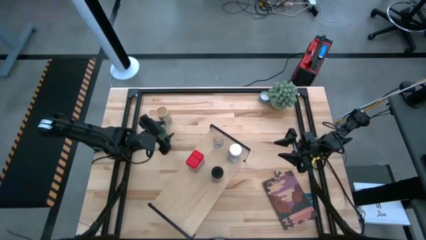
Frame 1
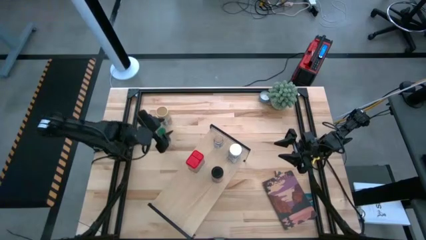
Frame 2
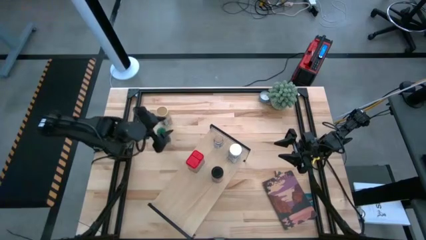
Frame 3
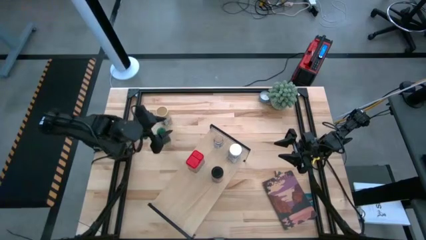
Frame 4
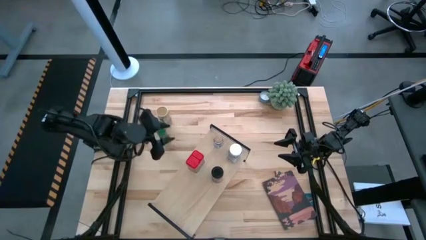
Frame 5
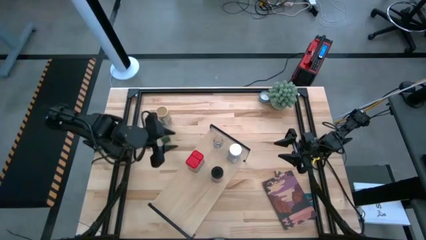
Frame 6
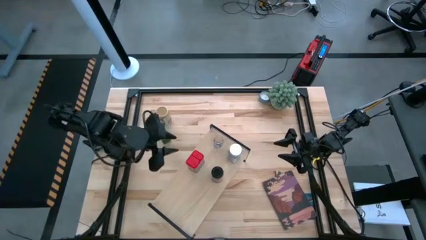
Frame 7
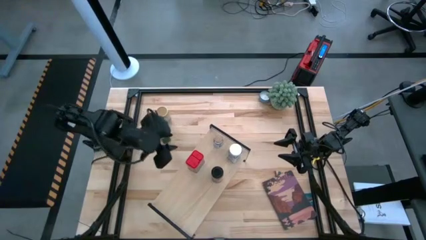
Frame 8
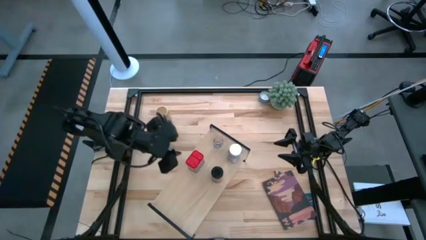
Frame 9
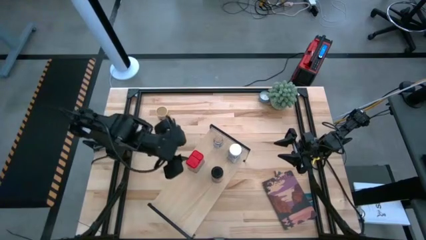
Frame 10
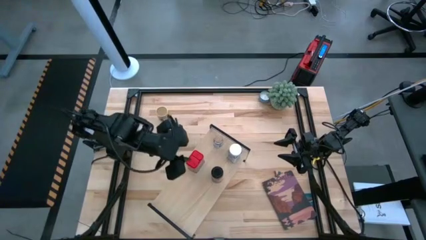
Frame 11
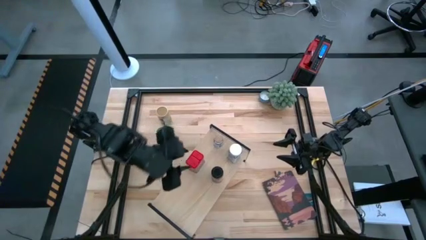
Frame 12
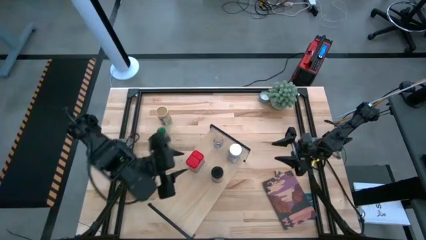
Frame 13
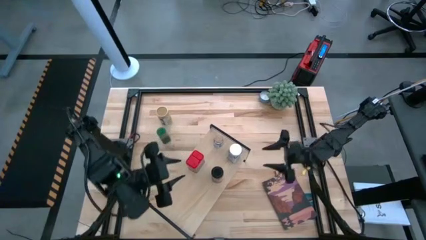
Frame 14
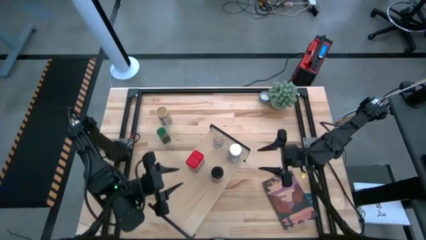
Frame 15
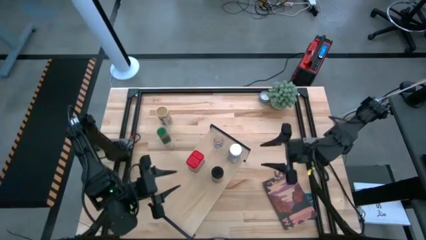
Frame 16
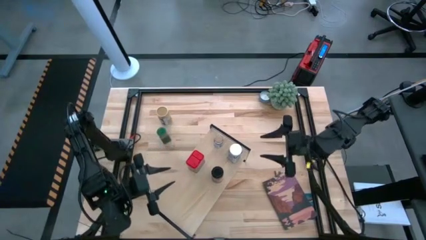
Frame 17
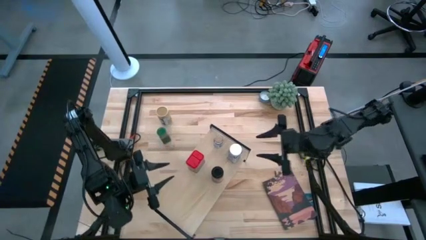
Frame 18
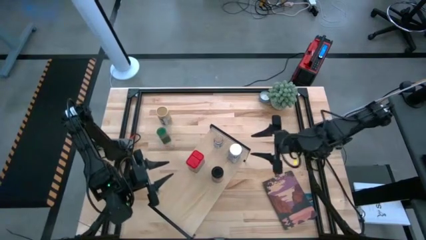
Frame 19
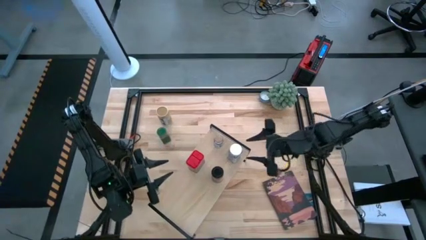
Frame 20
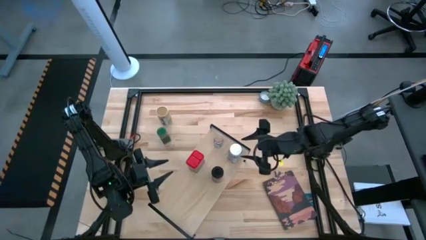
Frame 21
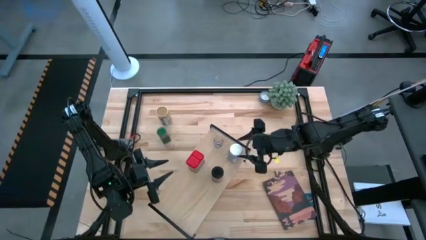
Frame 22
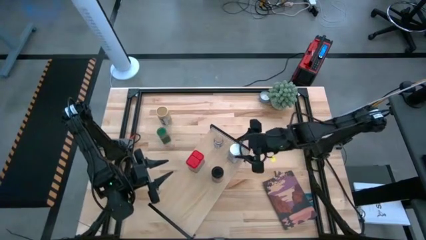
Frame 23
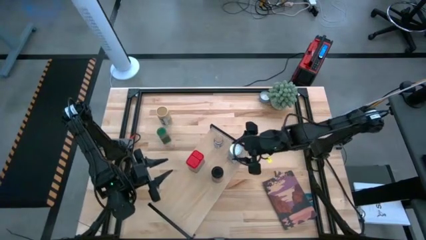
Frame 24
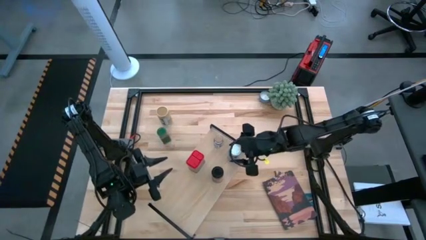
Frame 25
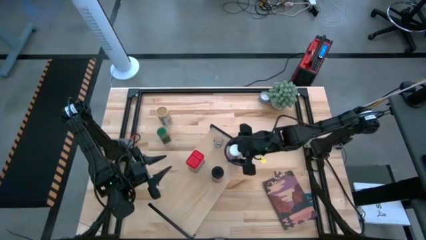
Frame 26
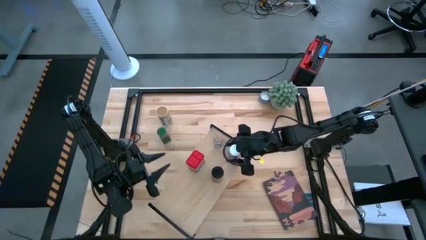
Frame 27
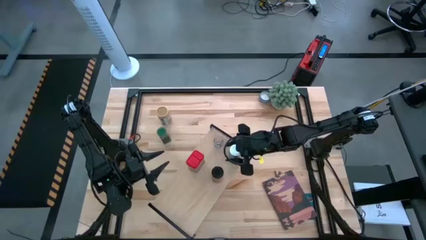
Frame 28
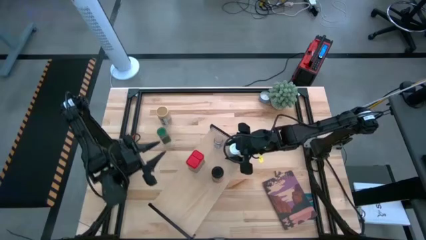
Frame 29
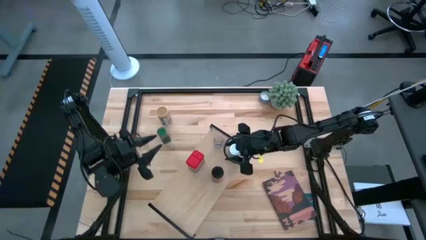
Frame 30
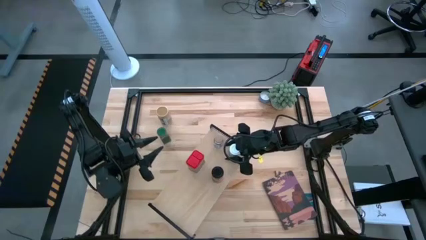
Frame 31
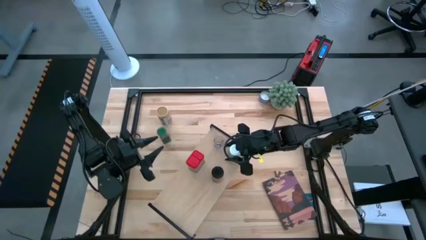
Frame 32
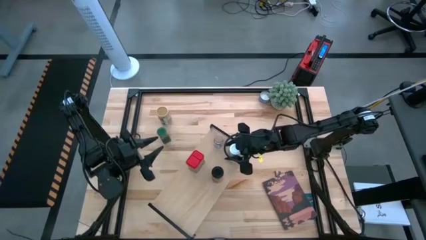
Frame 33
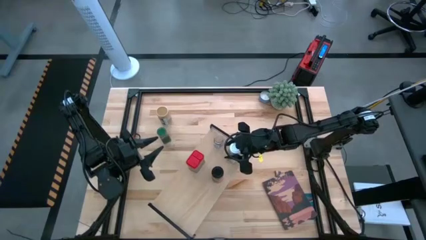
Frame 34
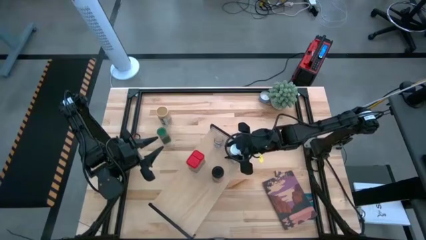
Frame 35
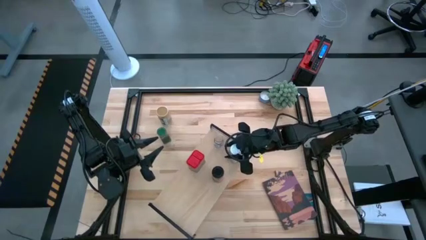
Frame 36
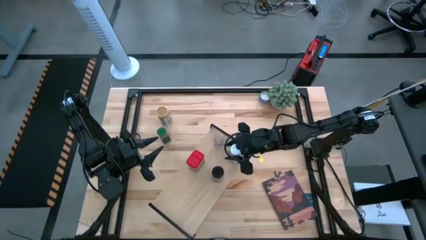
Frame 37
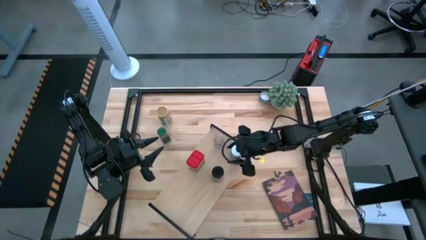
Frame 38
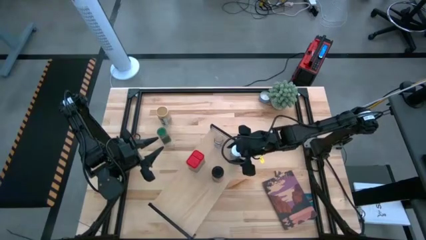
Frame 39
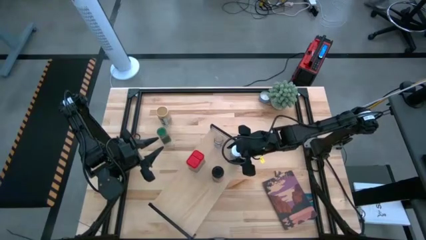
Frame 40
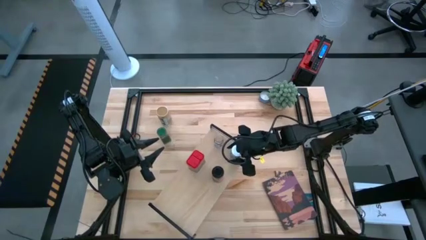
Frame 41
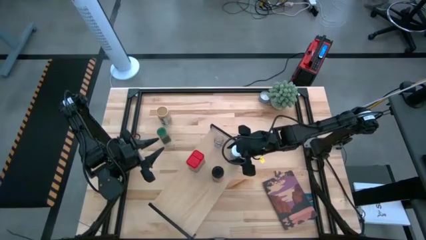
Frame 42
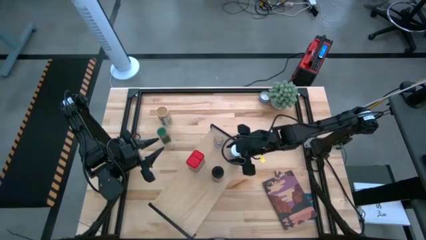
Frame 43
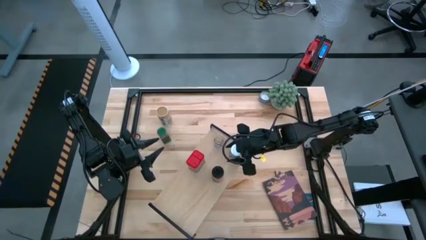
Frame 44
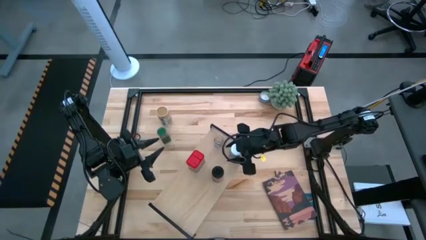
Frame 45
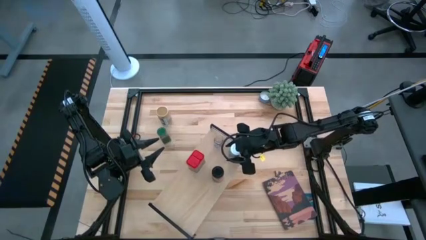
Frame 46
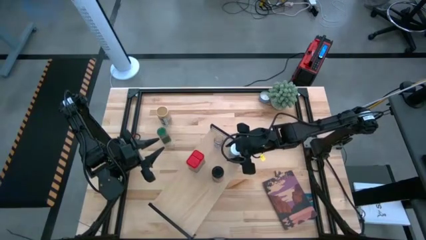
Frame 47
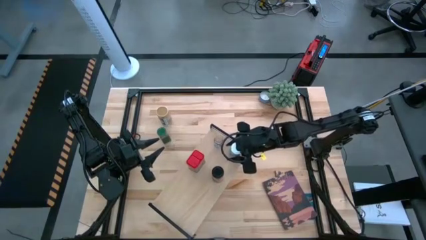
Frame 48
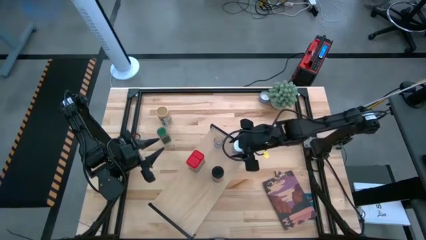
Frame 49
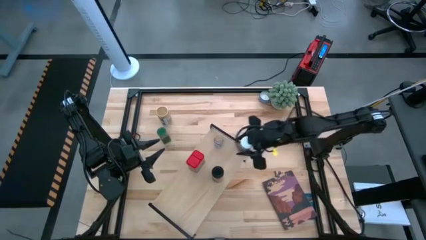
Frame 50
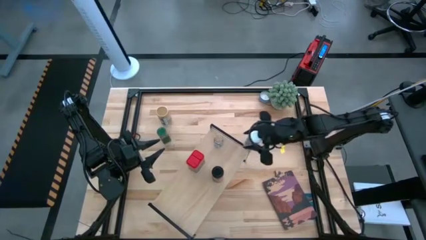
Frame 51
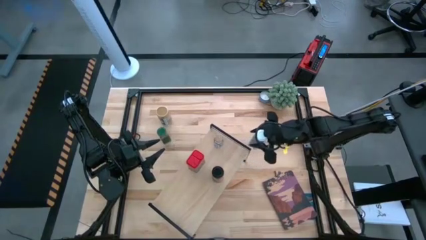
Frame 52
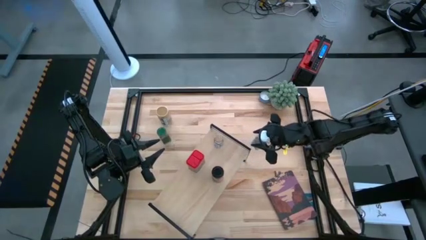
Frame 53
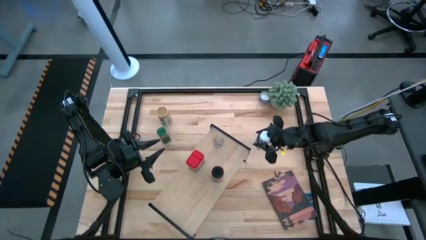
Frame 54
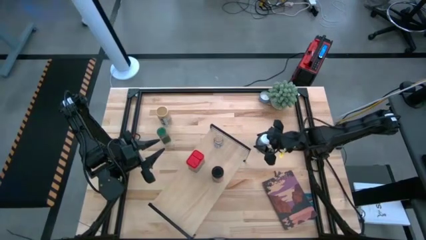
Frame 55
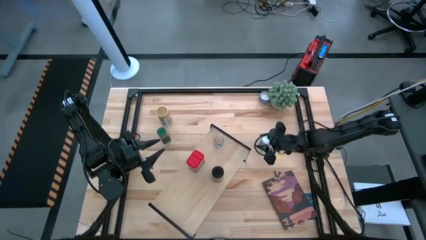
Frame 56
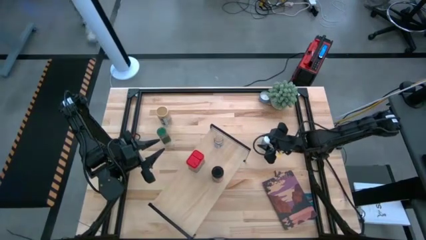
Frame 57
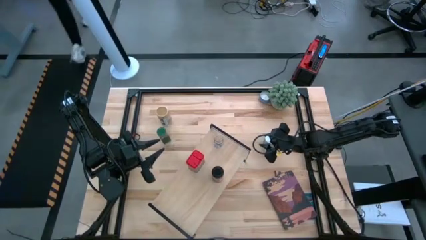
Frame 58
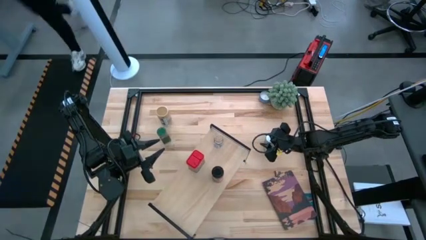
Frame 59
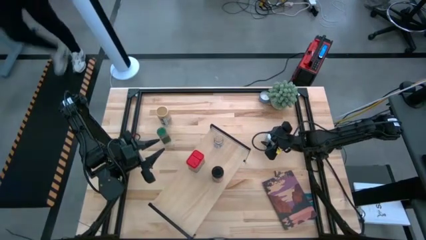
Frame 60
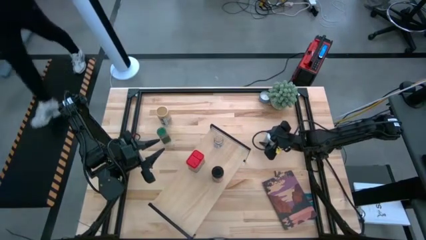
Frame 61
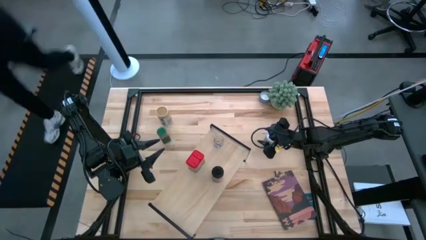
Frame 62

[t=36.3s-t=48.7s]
Task: Shelf spices
Remove the white seasoning bottle from the shelf

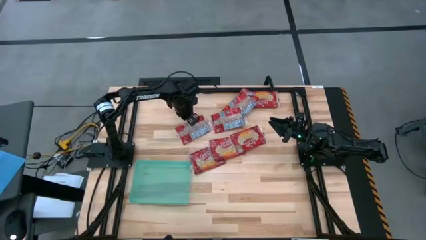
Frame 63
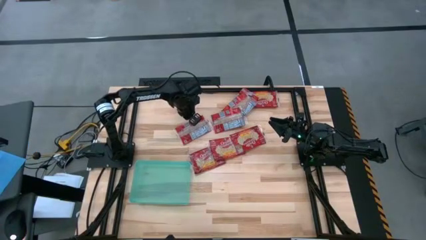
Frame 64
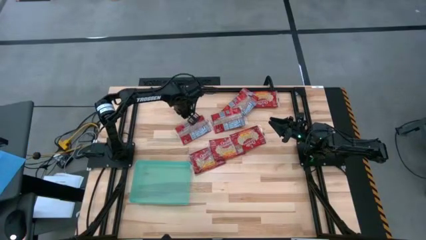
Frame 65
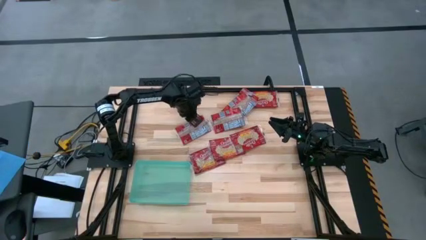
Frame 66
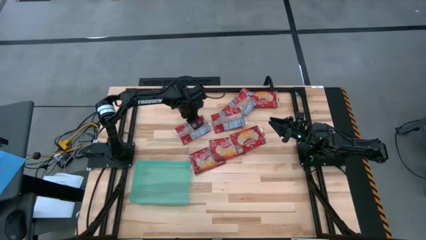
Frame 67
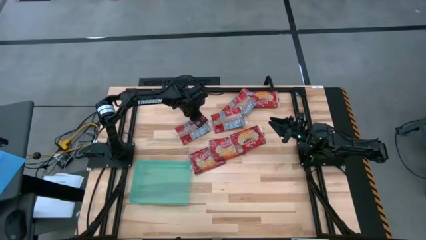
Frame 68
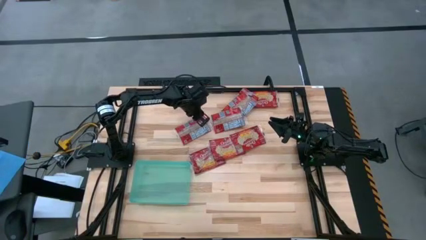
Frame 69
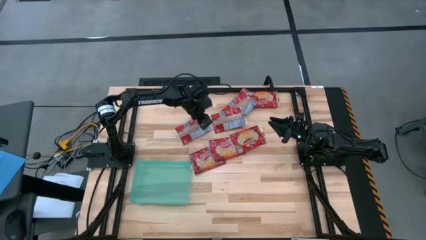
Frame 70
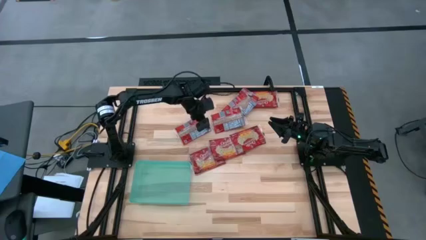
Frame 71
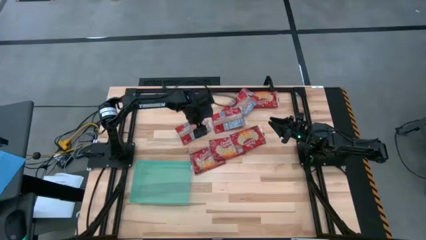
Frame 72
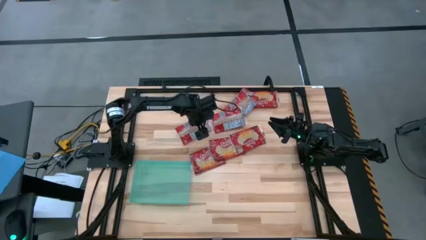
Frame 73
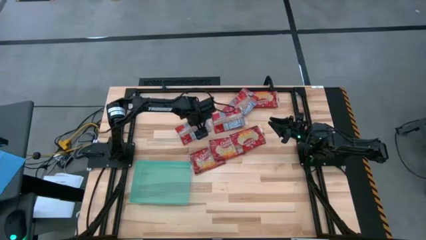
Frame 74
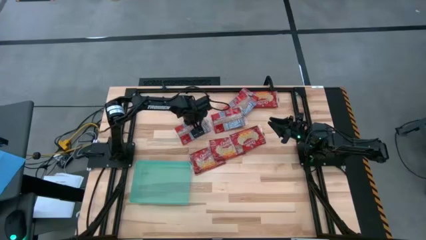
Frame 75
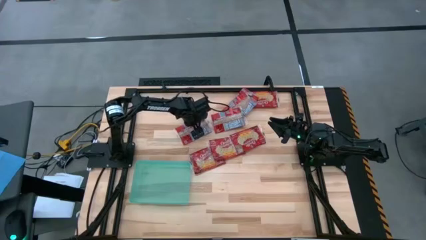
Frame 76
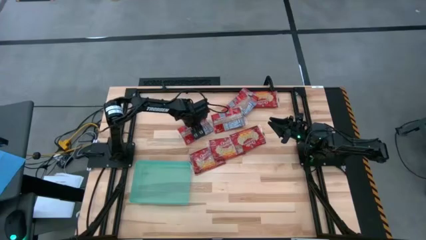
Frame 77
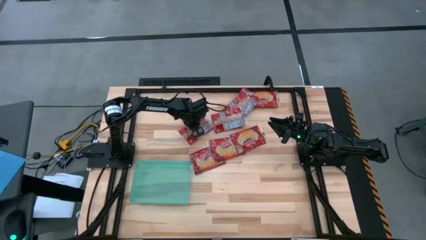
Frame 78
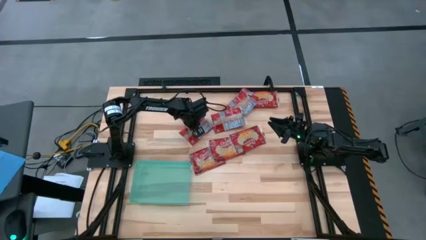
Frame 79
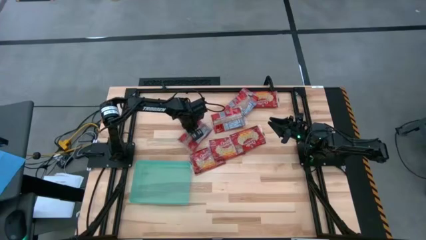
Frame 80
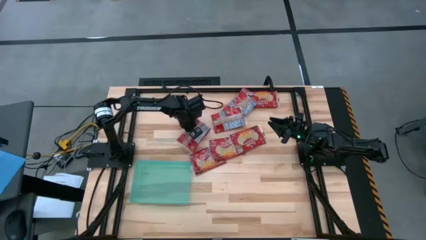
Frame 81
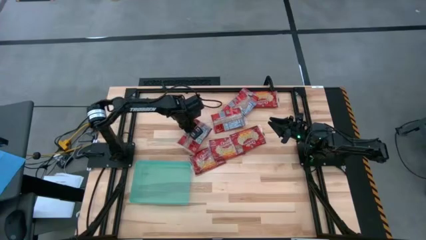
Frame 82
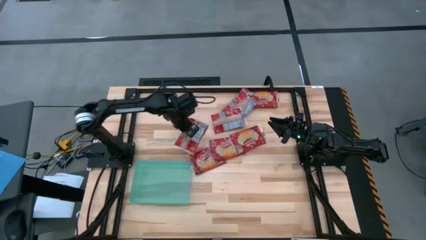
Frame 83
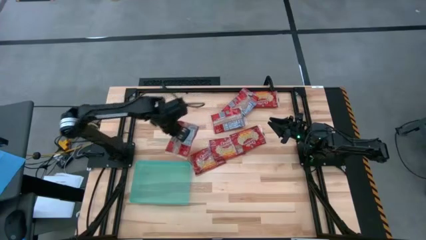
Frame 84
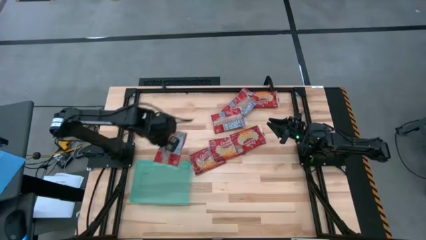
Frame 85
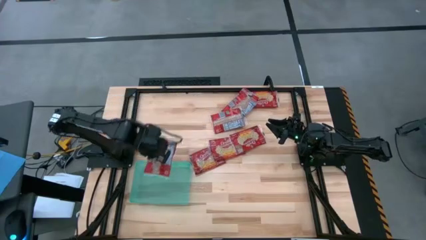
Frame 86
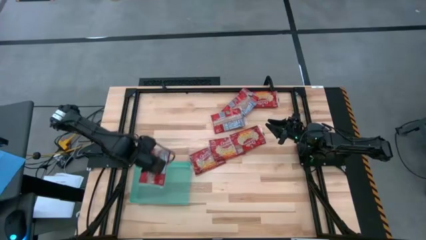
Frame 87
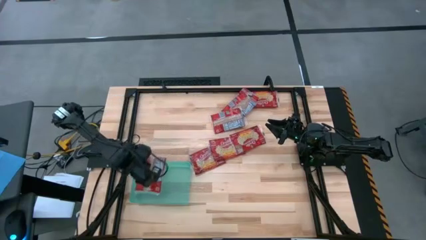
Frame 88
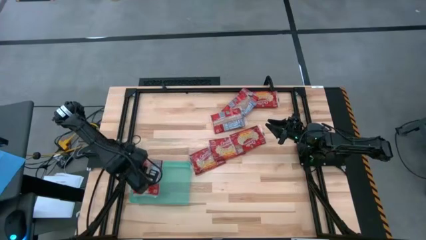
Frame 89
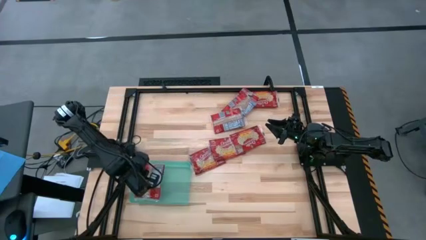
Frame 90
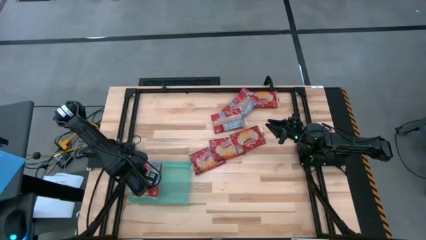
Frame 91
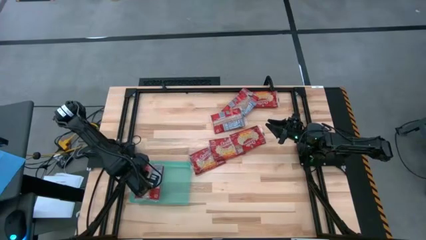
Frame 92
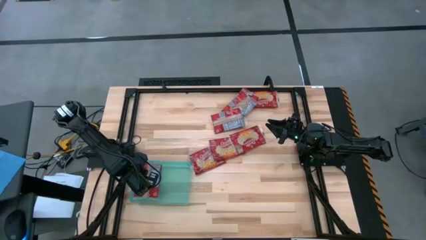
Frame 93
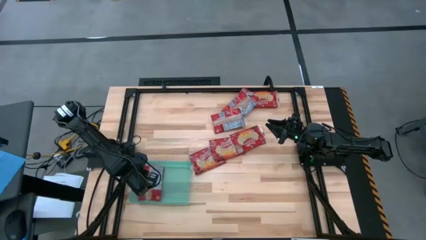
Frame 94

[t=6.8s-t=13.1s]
Task: Sort popcorn bags into baskets
Put the red popcorn pack into the green bin
